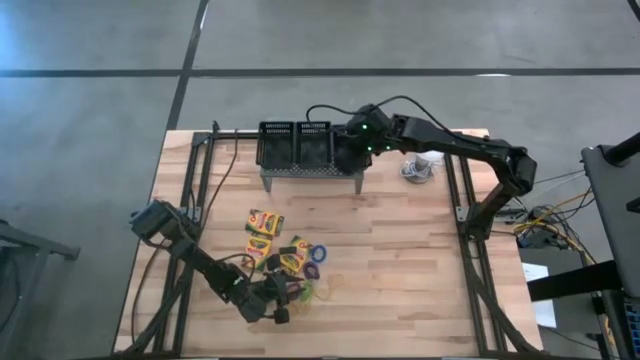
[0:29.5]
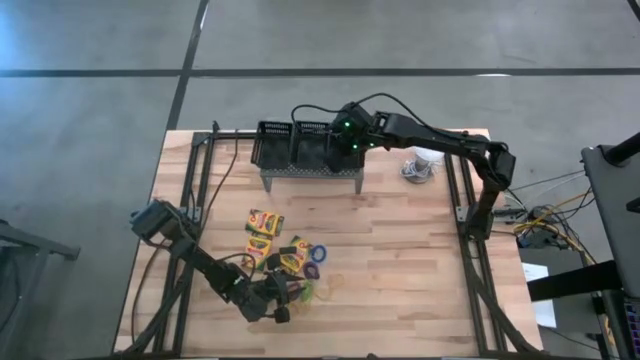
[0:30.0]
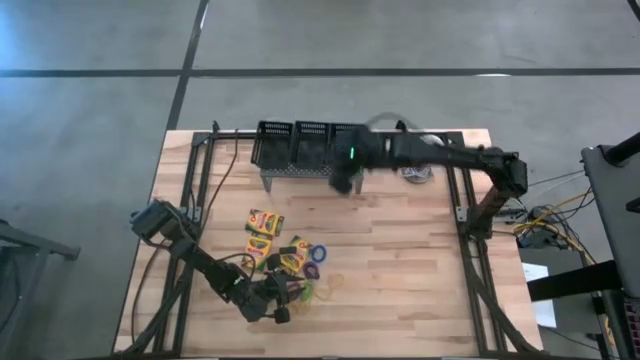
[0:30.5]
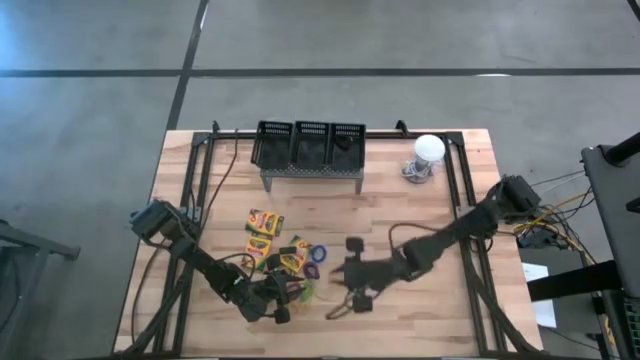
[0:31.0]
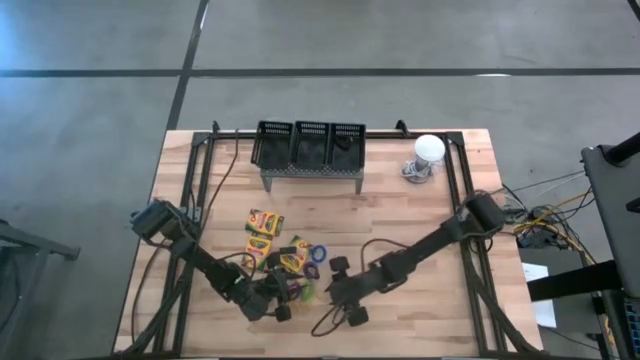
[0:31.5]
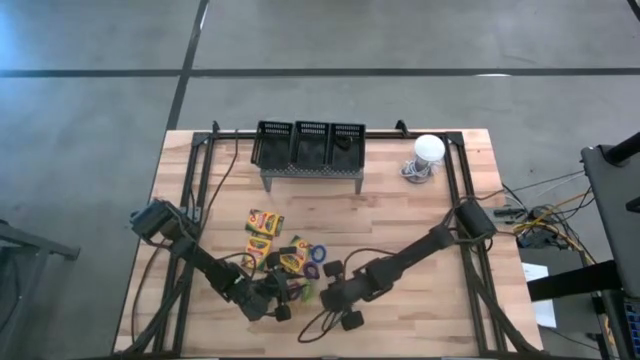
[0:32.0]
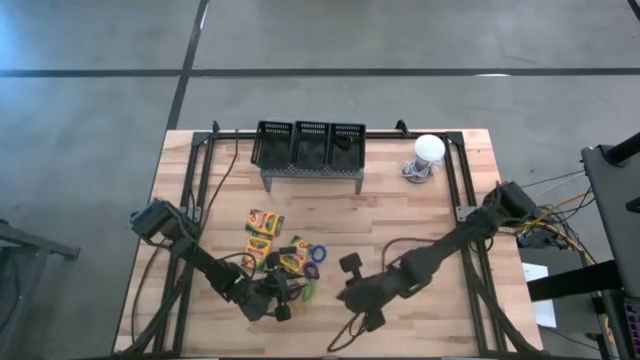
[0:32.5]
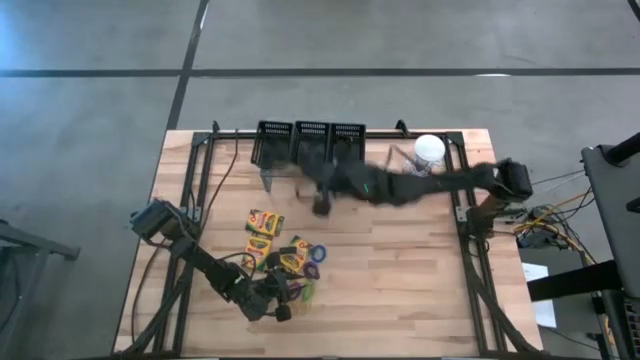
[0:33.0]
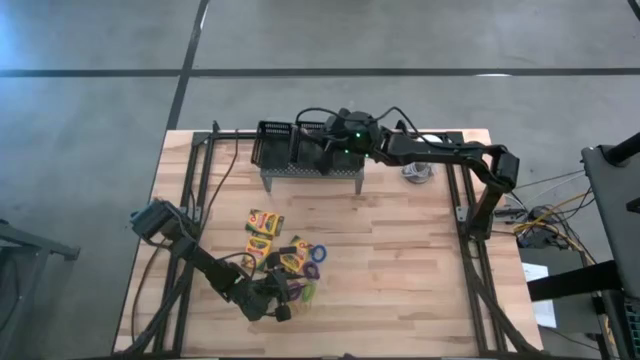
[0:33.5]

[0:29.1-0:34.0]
Task: Pick & Place Office Desk Supplies
Put the yellow rubber band into the middle black bin on the shelf

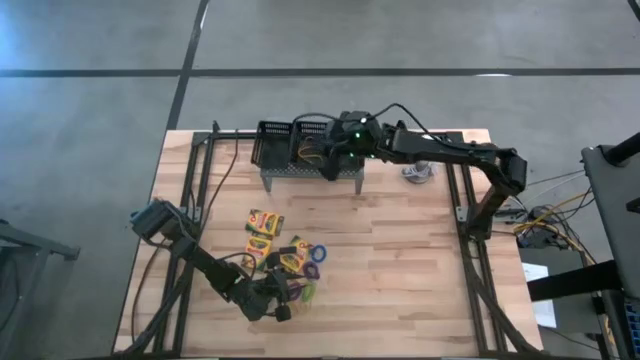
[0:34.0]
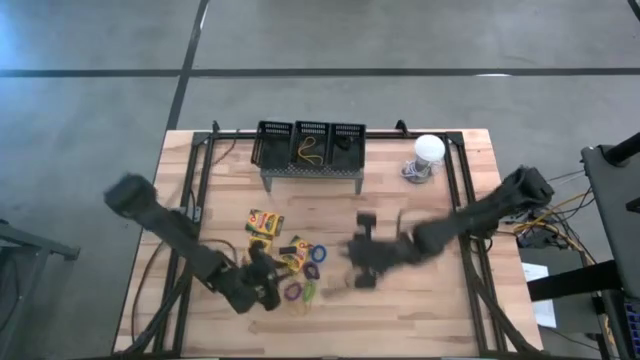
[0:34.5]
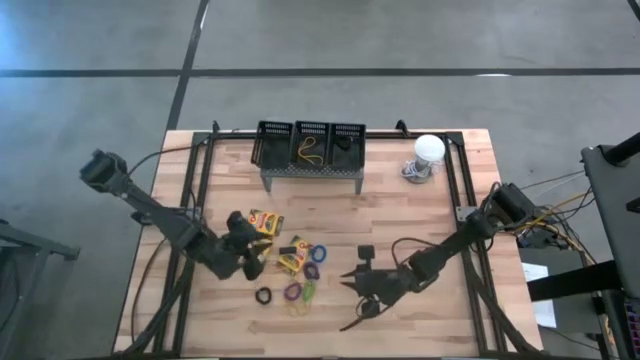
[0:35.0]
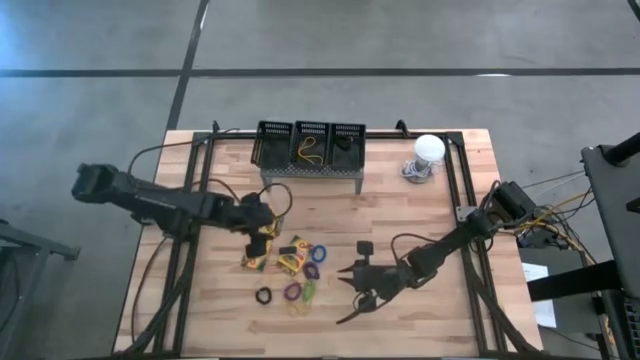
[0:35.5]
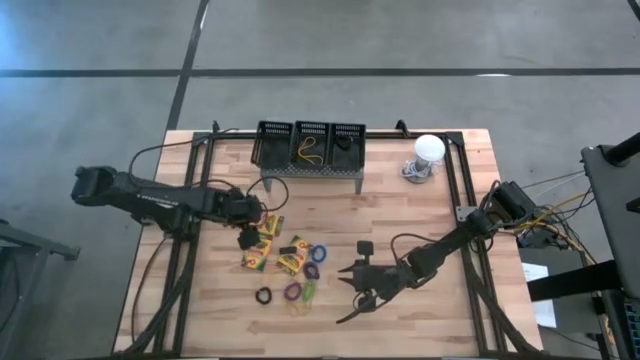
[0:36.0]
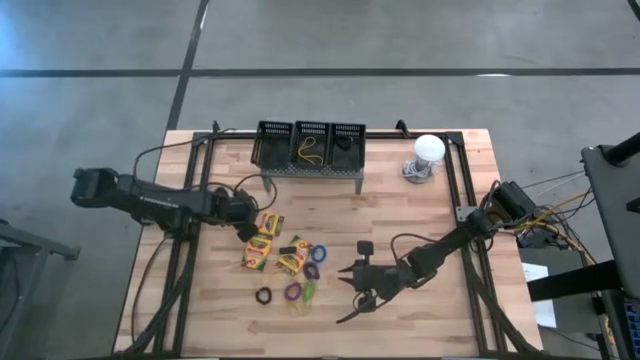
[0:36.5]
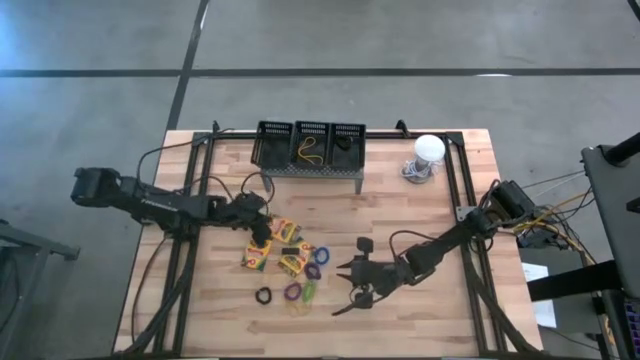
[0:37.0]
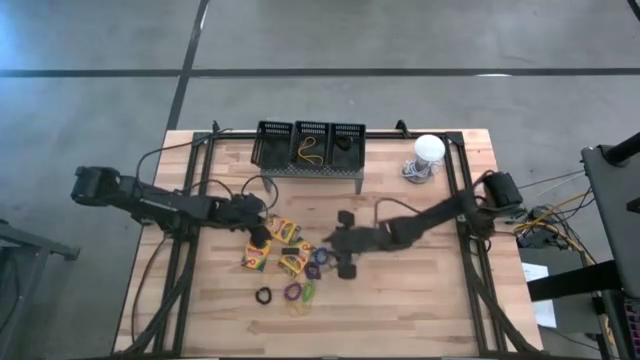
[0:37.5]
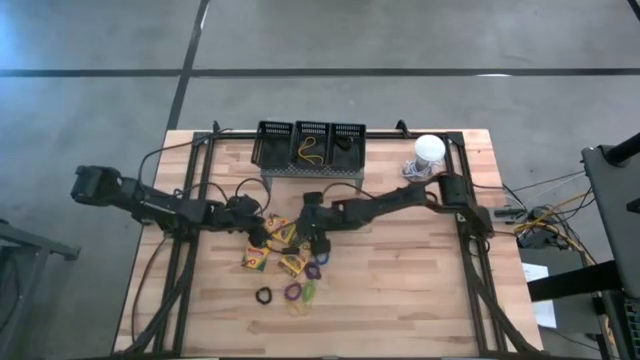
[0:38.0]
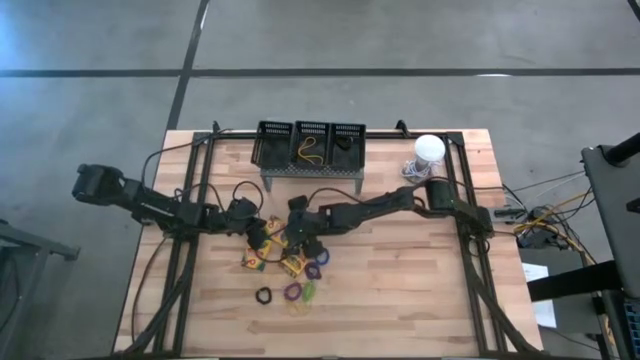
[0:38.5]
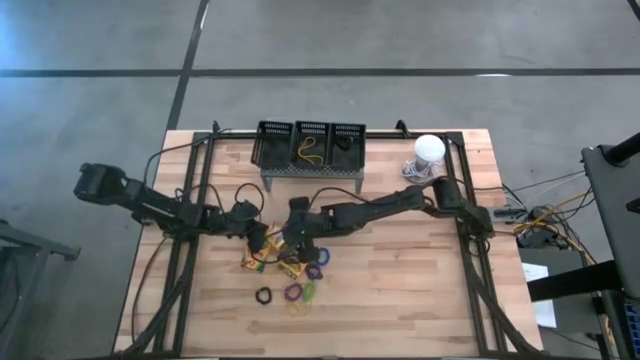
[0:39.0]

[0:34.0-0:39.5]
Put the yellow crayon box into the left black bin on the shelf

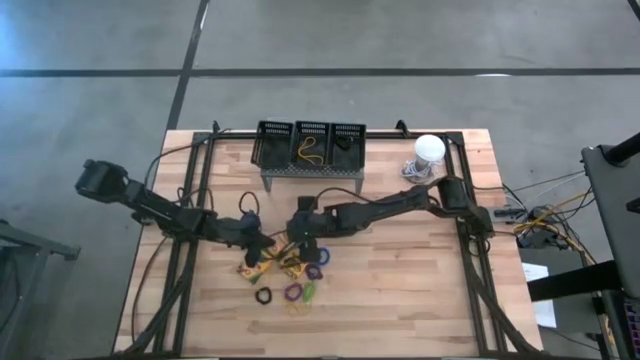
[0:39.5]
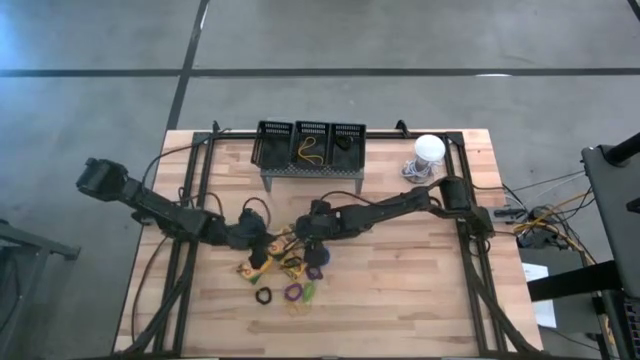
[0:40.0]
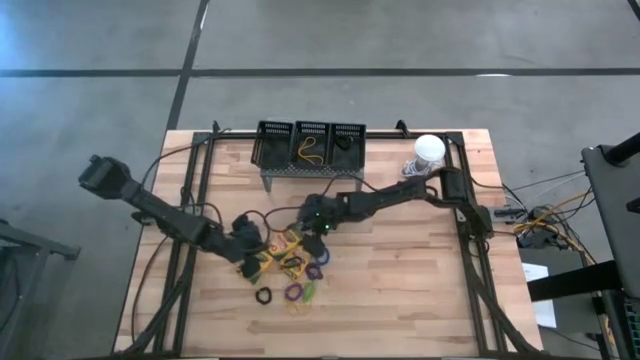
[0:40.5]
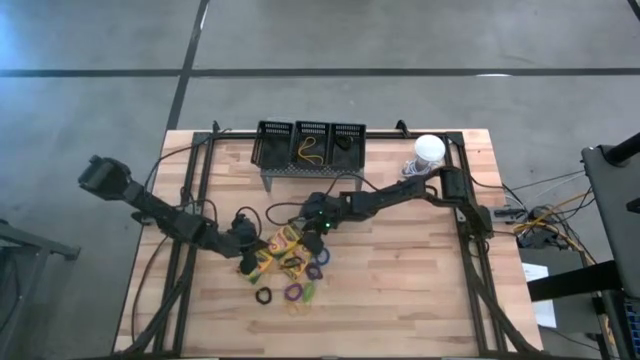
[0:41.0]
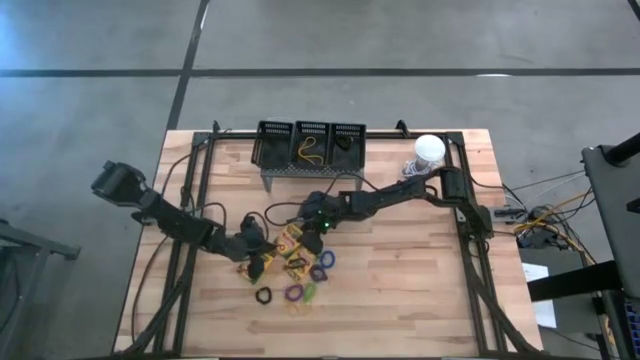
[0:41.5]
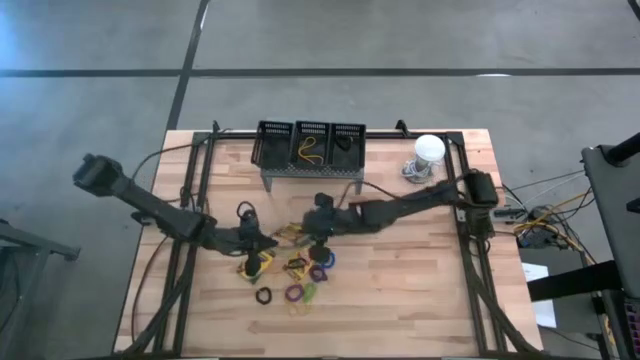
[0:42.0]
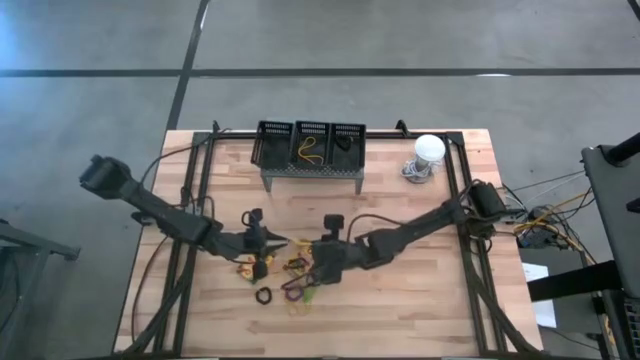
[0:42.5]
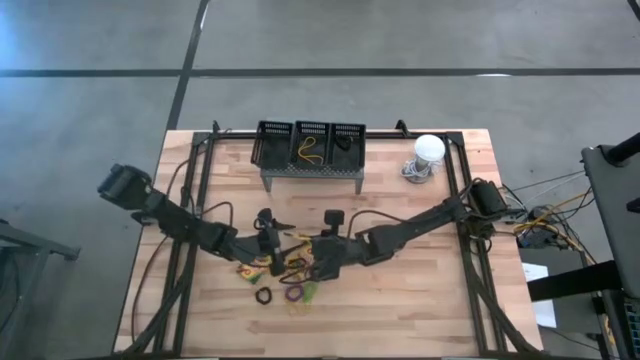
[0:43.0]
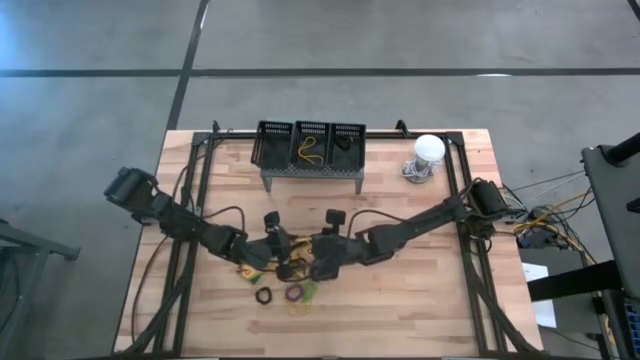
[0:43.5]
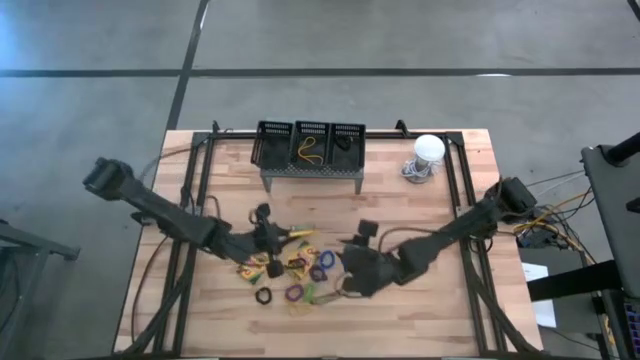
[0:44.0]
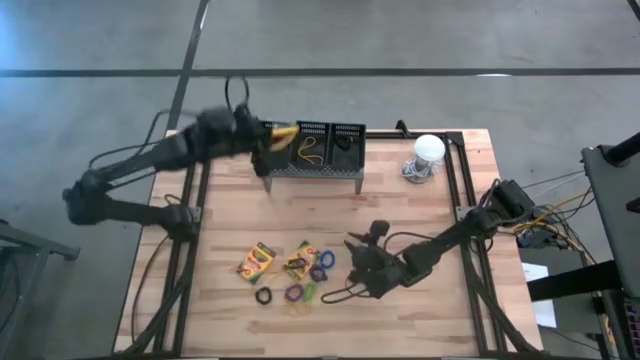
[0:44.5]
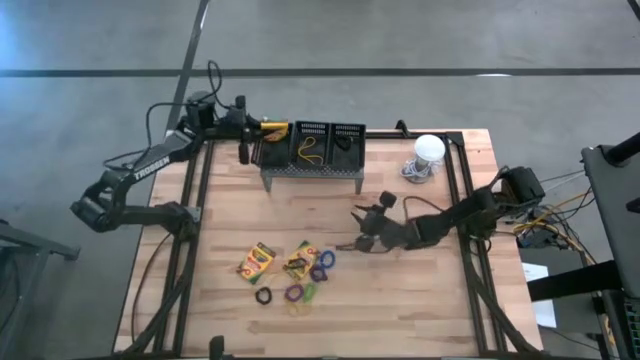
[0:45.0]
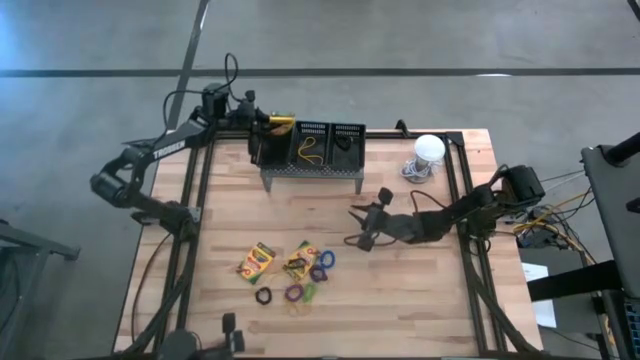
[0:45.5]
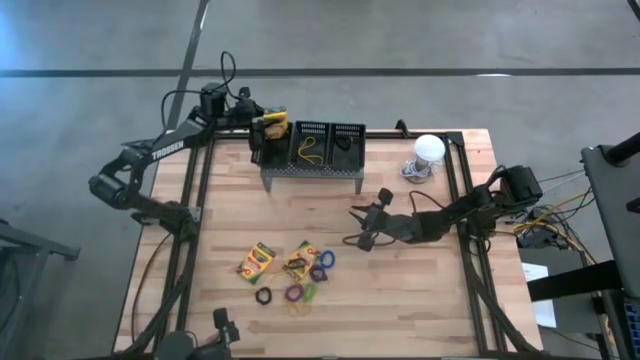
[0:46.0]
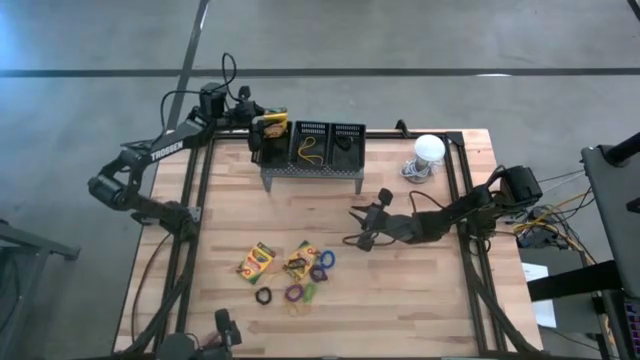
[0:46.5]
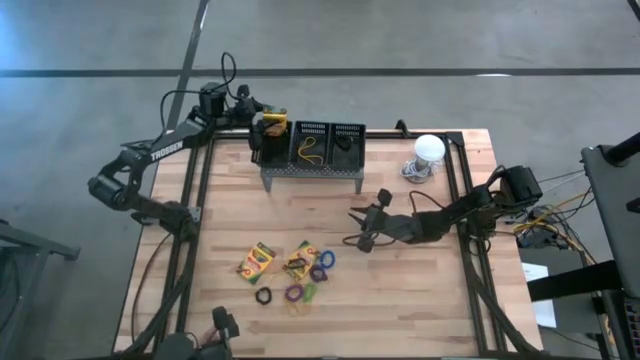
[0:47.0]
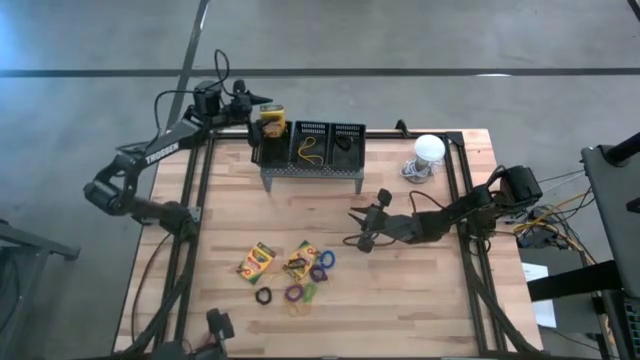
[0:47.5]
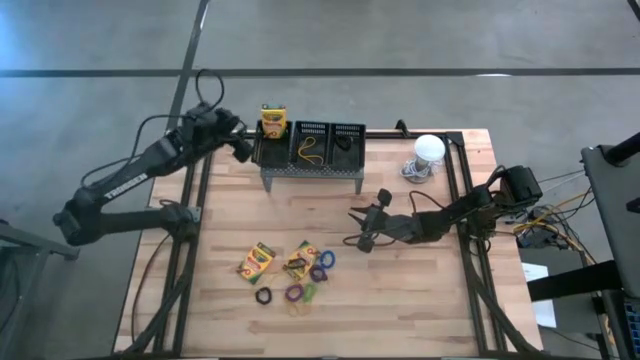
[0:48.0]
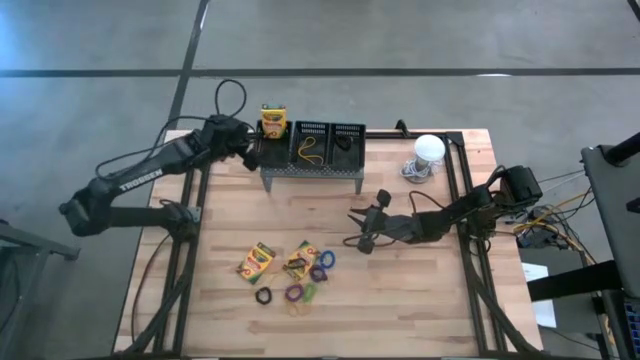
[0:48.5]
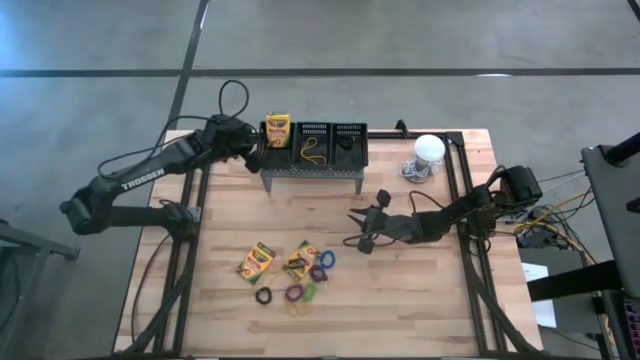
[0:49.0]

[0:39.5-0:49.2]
Put the yellow crayon box into the left black bin on the shelf

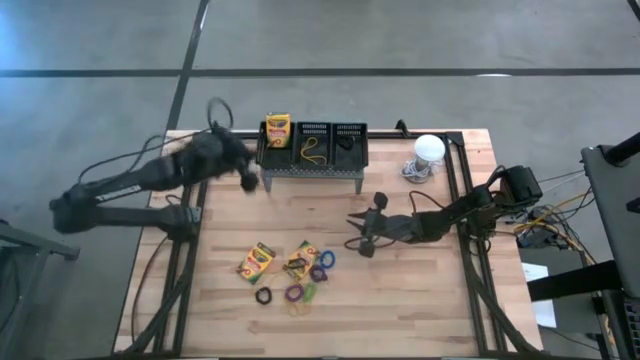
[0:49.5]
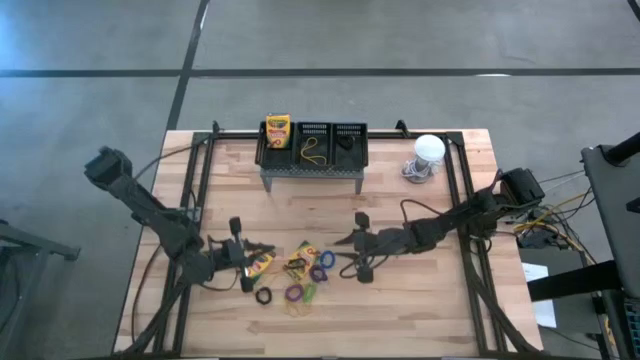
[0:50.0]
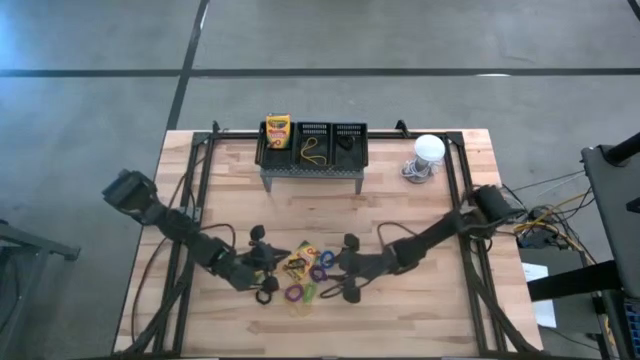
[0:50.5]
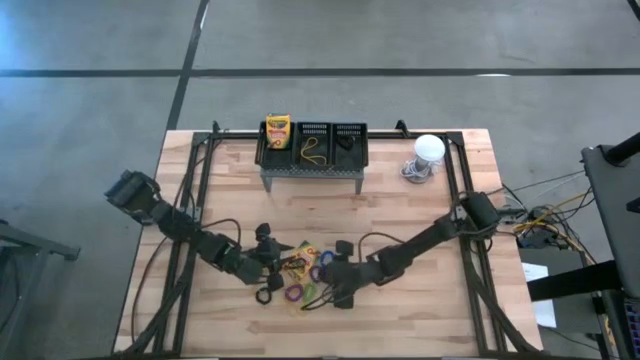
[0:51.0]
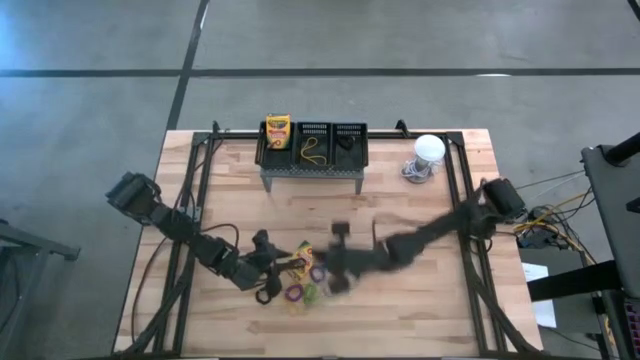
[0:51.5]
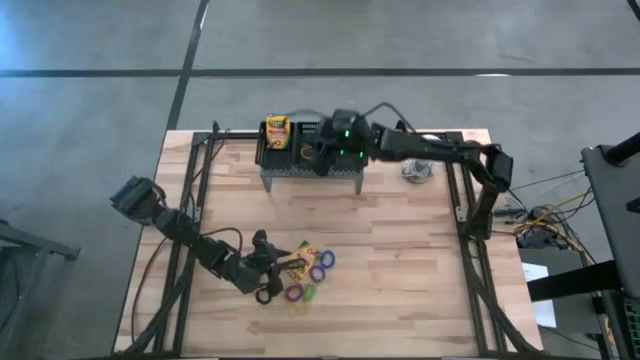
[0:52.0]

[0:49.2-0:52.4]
Put the black rubber band into the middle black bin on the shelf
